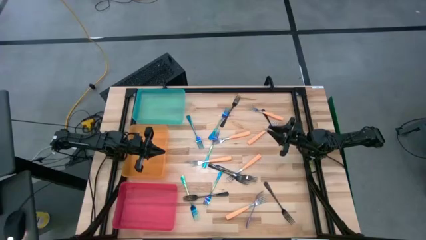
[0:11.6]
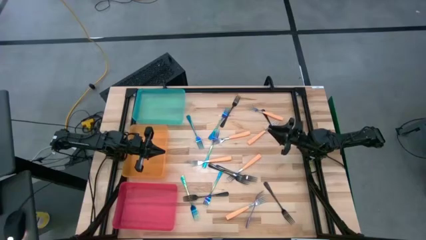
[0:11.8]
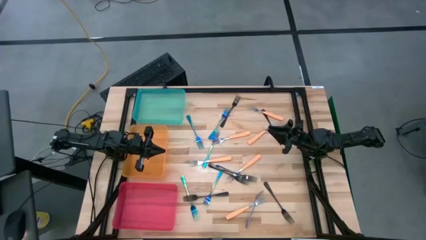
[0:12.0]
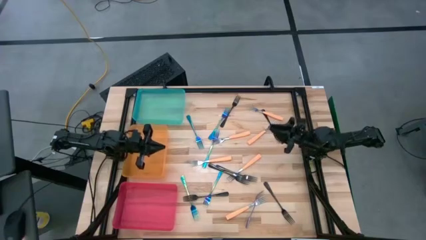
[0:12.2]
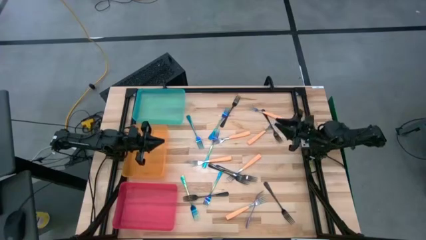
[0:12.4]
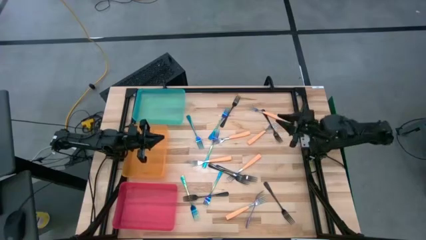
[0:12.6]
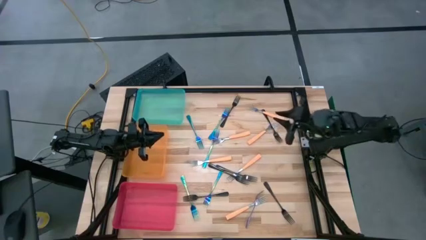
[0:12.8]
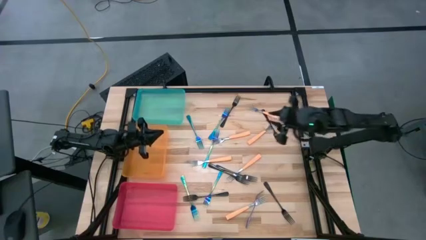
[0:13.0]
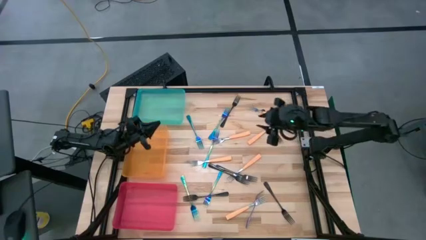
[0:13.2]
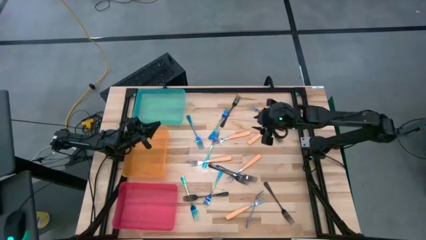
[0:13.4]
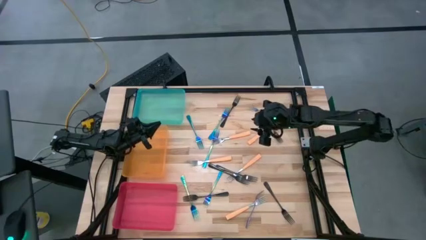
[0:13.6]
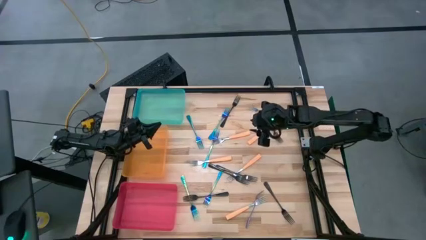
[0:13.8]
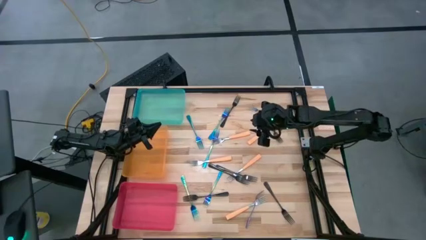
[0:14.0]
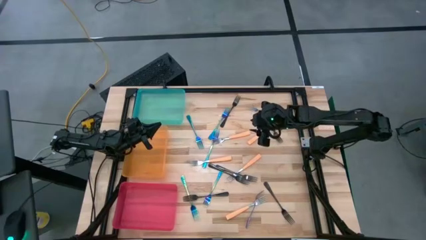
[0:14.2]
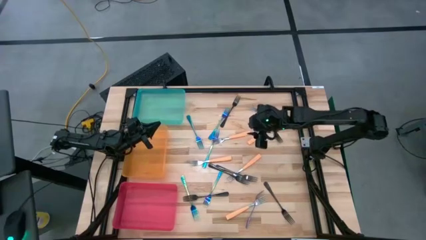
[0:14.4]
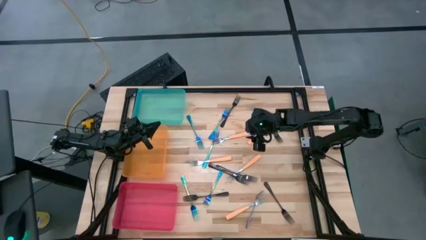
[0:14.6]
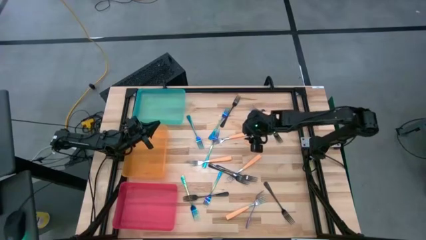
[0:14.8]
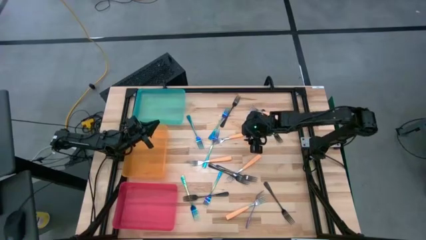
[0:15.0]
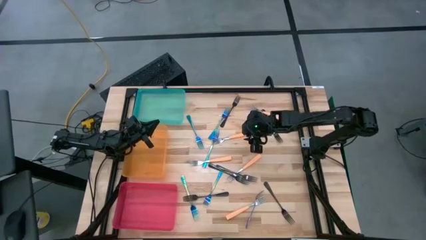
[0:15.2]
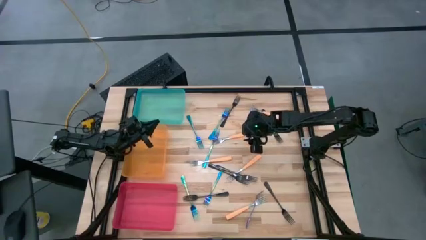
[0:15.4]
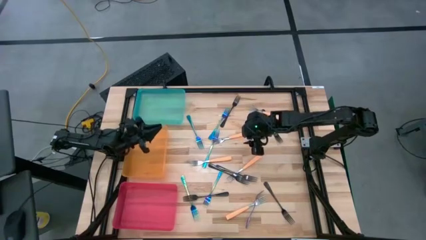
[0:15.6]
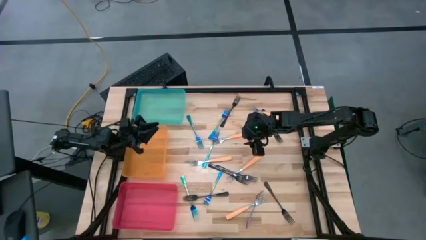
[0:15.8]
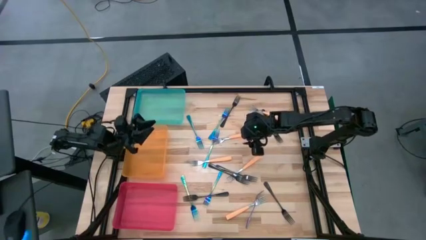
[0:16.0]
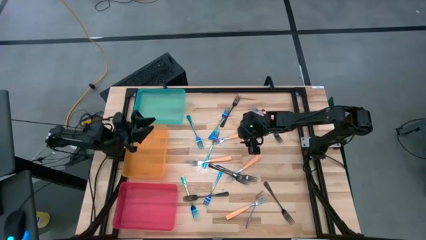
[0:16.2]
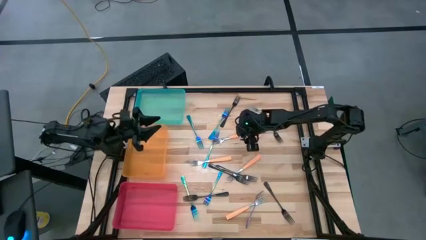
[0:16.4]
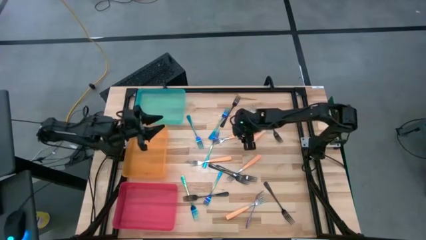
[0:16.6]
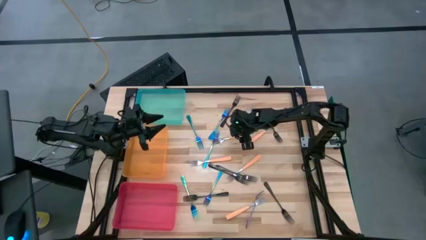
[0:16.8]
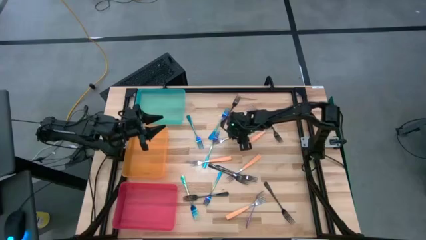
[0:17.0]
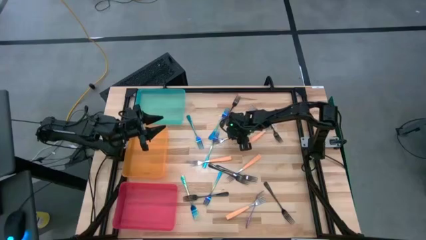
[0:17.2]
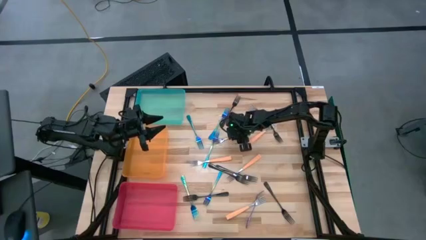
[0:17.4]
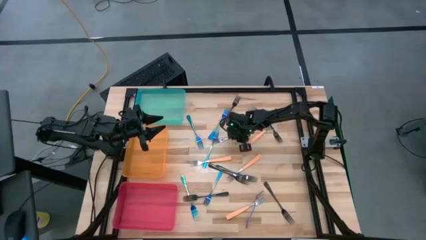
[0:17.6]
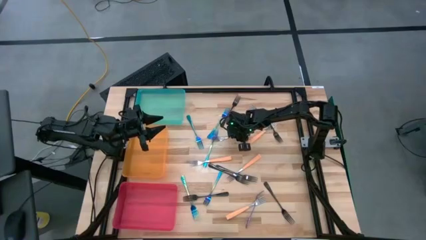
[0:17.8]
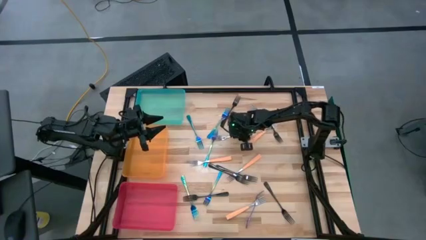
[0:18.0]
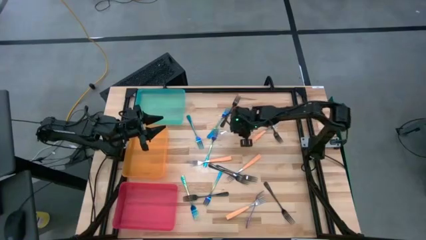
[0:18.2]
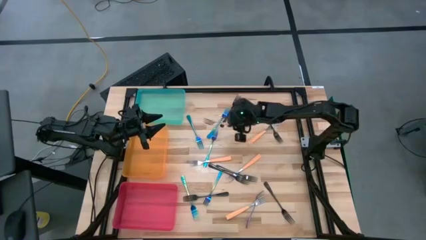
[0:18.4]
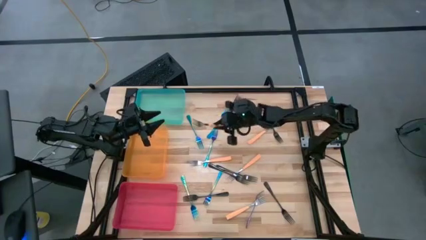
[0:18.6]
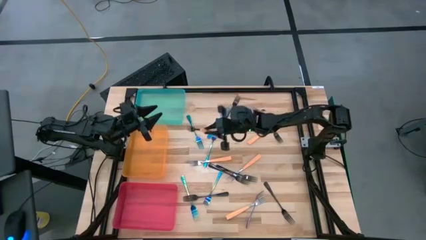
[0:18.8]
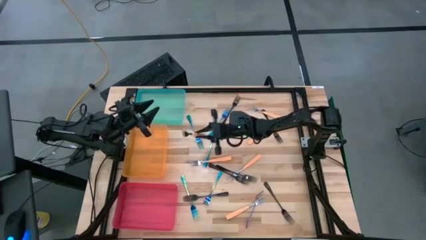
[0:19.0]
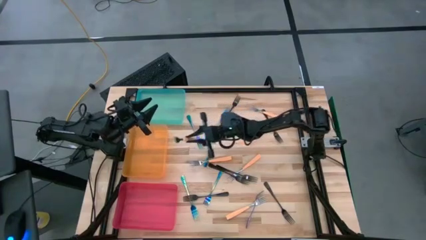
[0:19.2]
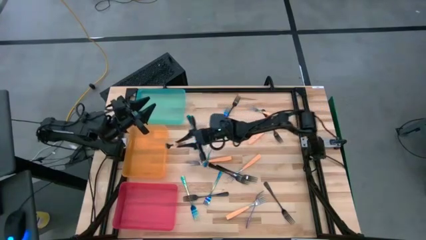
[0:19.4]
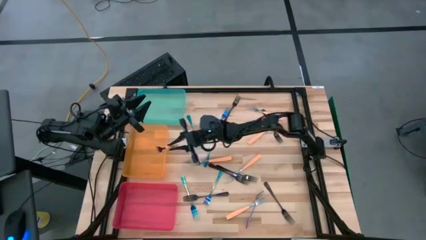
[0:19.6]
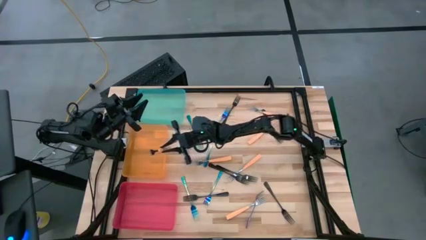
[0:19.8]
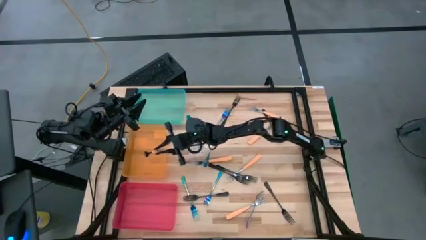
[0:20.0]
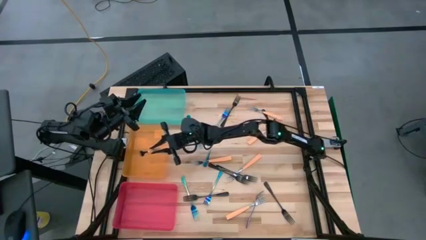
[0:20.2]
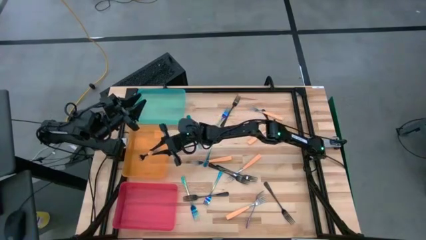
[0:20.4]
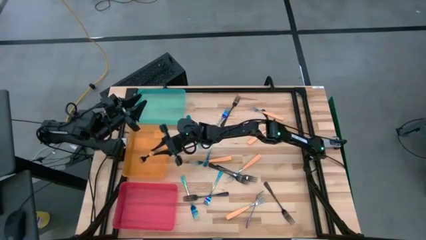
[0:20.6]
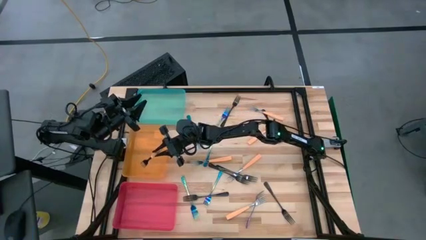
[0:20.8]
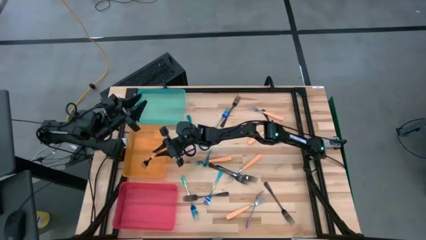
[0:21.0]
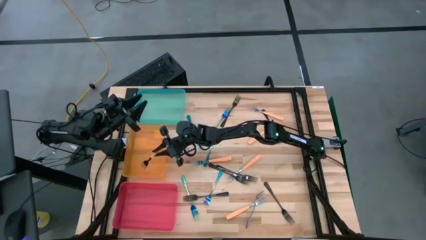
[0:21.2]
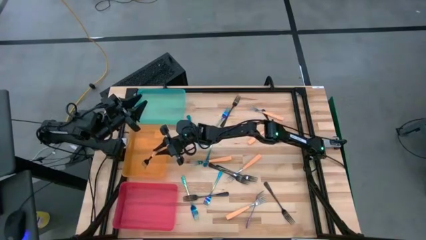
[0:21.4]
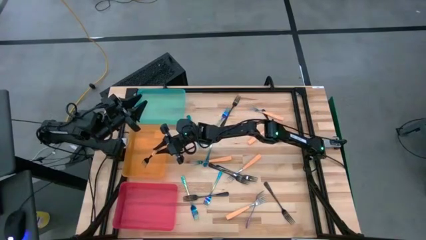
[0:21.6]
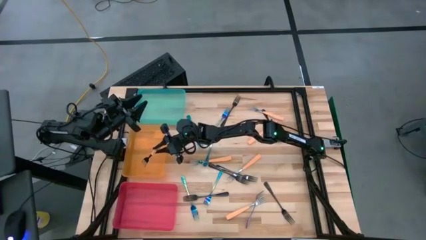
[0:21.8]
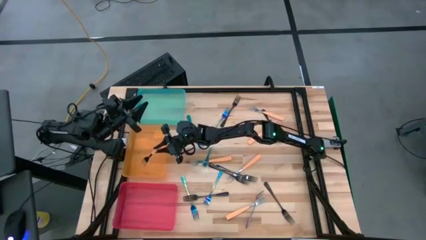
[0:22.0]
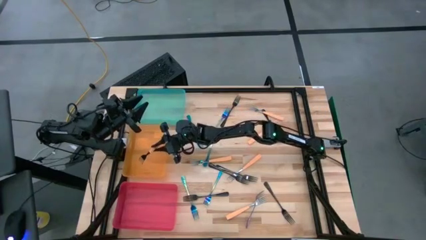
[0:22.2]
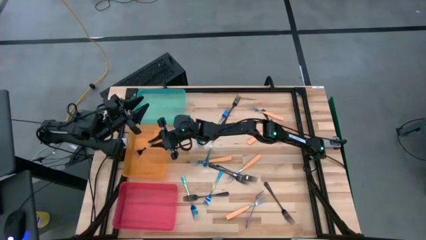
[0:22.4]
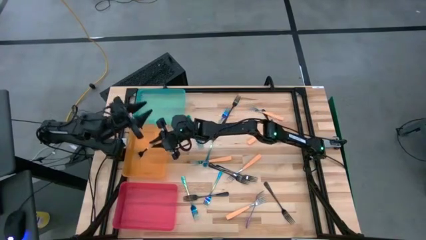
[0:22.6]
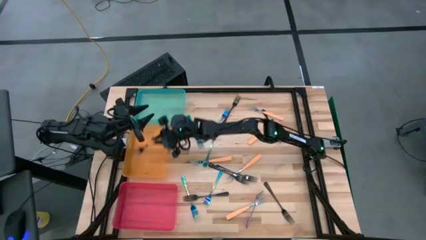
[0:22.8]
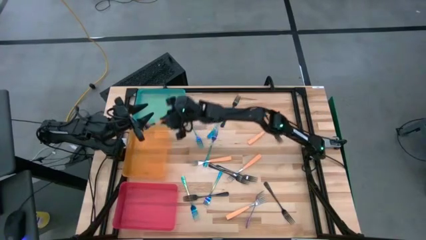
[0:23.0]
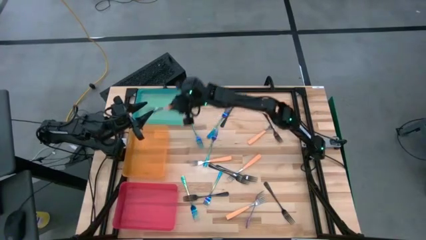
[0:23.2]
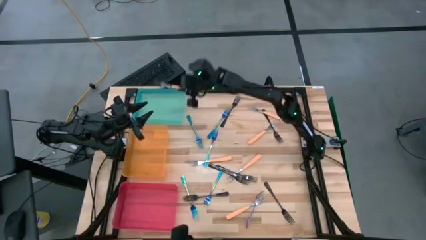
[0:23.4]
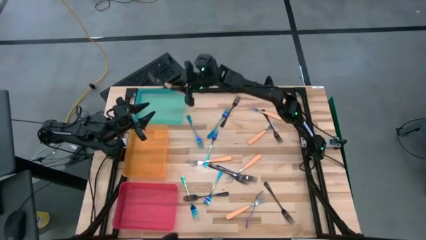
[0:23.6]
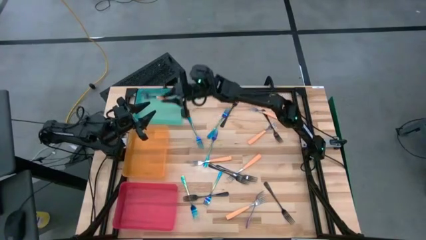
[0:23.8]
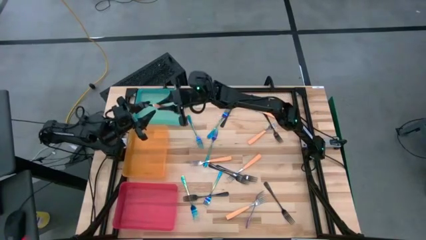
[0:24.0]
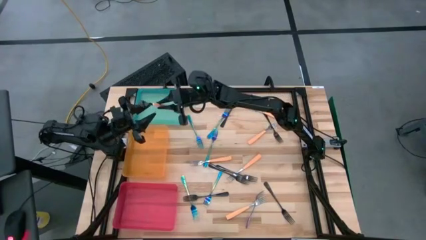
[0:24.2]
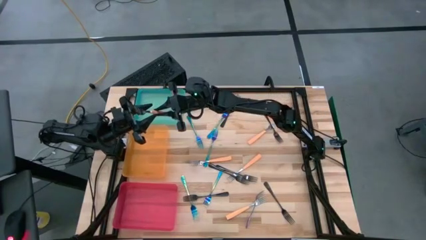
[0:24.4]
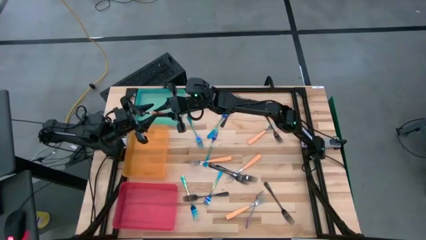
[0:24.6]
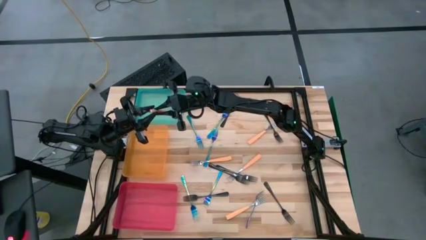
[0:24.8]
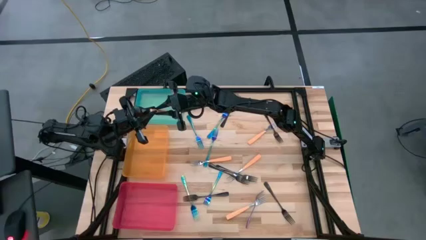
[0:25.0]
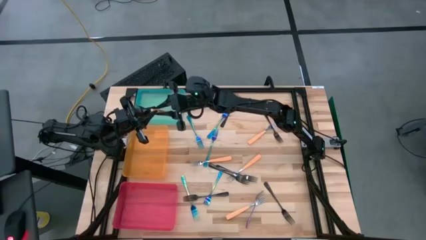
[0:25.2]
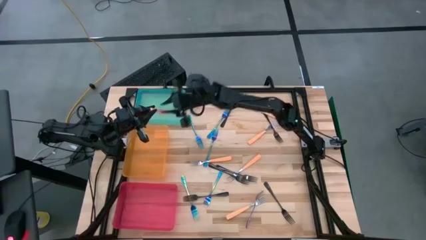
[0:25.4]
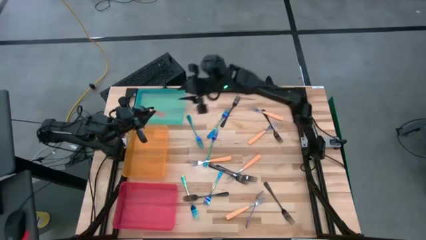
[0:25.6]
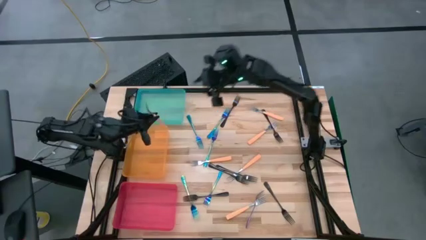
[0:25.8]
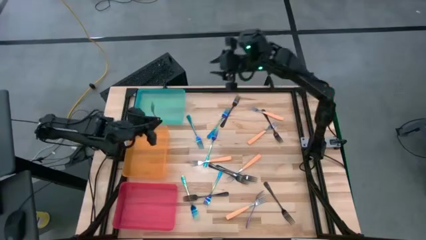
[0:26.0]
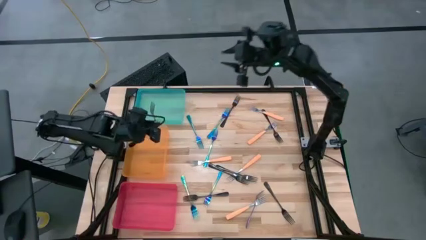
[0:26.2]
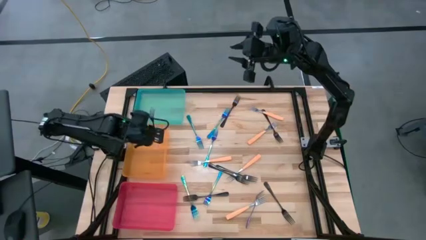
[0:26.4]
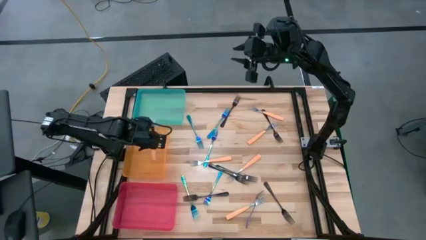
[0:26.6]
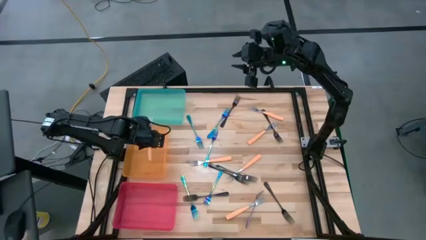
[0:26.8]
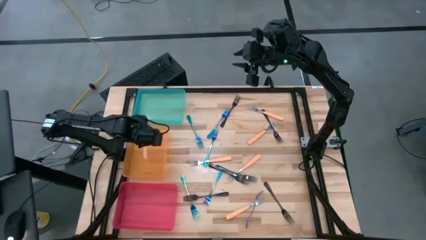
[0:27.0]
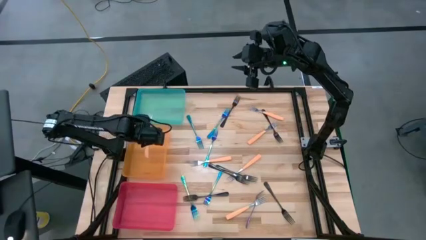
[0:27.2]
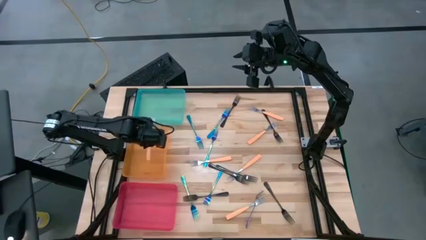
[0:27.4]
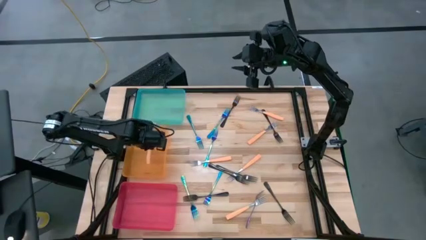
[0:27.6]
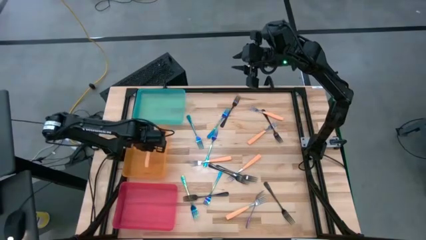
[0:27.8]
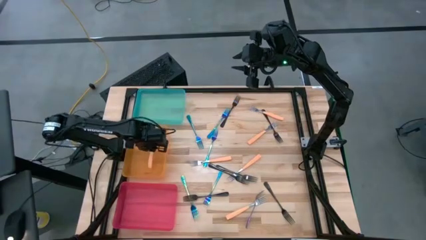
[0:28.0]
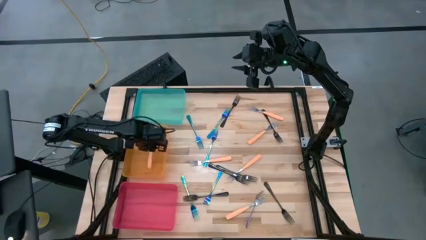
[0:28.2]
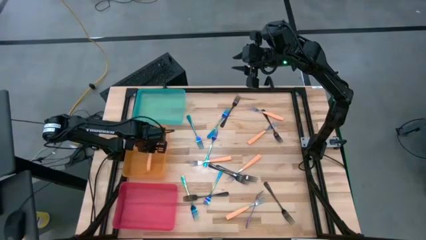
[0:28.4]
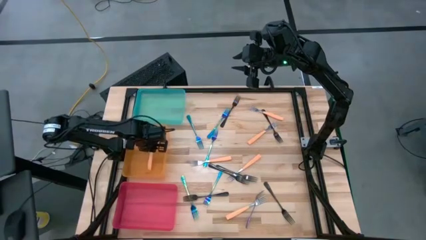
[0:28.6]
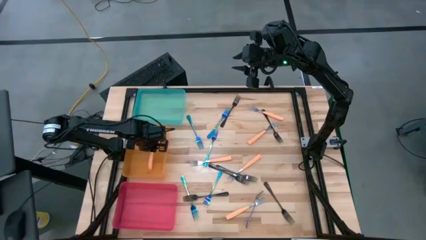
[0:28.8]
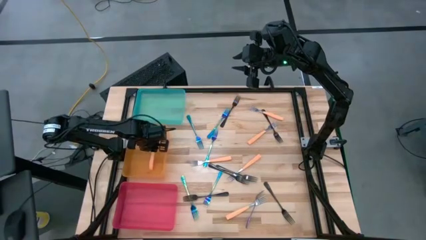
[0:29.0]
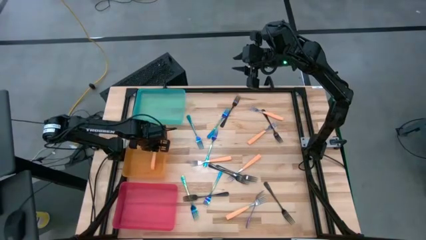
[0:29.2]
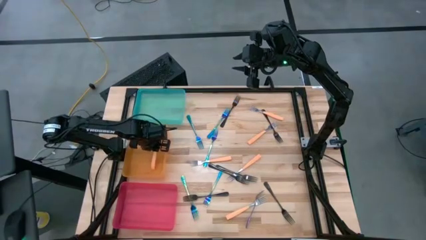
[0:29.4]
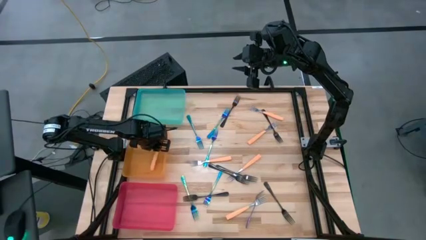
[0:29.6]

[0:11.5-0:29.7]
Task: Sort silverware by color (type)
Put the orange fork into the orange bin
